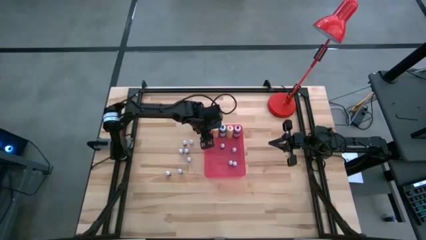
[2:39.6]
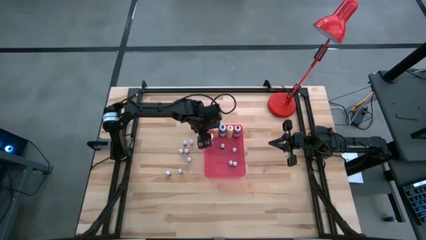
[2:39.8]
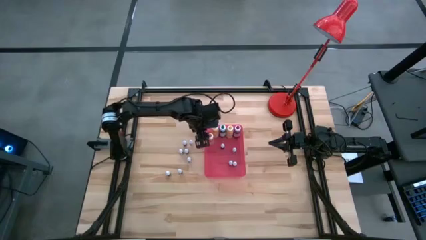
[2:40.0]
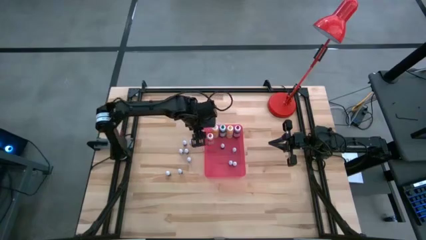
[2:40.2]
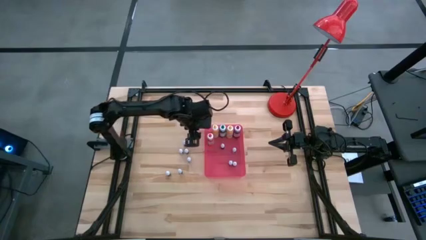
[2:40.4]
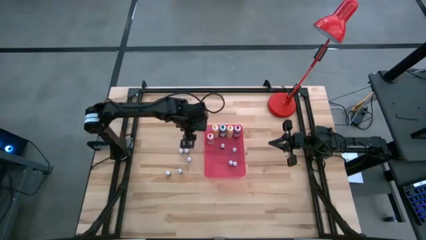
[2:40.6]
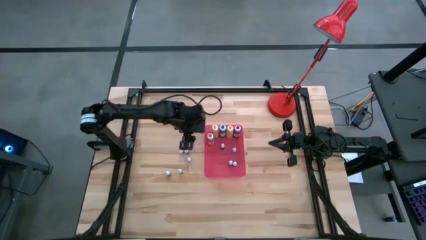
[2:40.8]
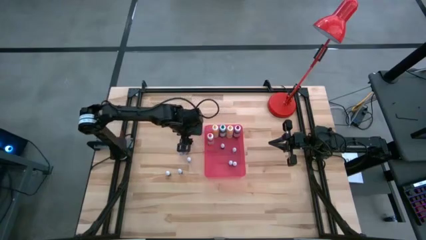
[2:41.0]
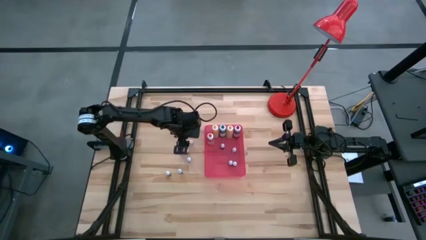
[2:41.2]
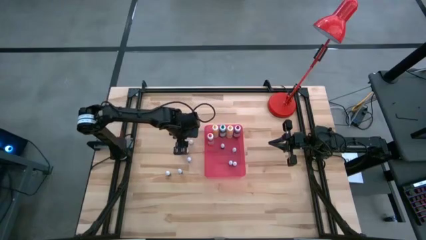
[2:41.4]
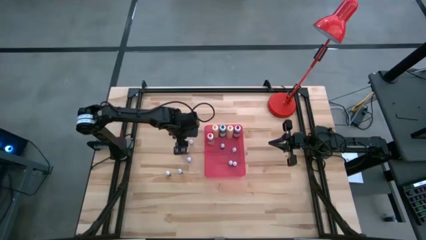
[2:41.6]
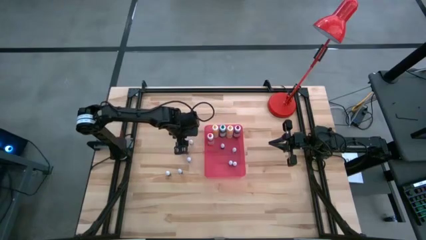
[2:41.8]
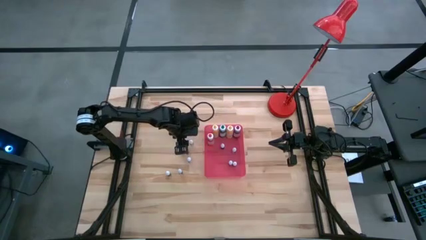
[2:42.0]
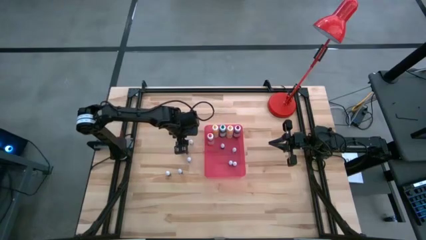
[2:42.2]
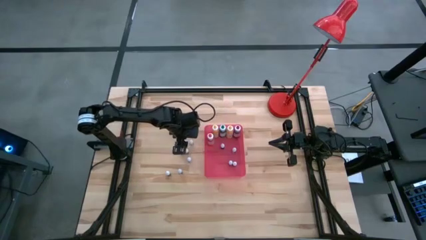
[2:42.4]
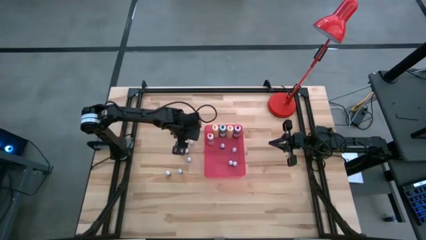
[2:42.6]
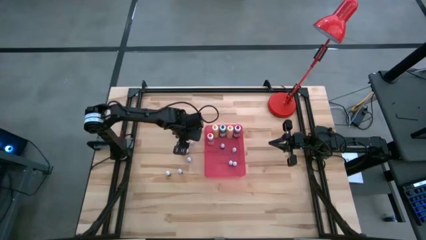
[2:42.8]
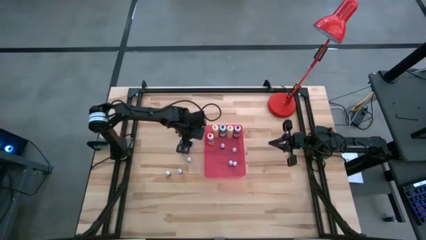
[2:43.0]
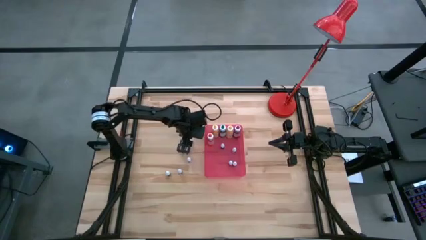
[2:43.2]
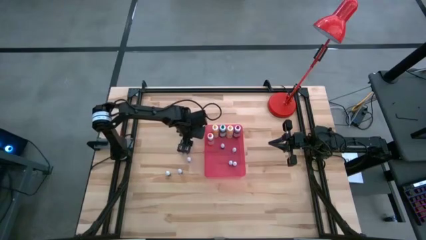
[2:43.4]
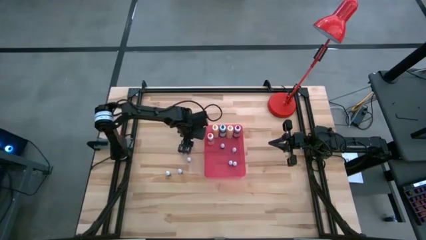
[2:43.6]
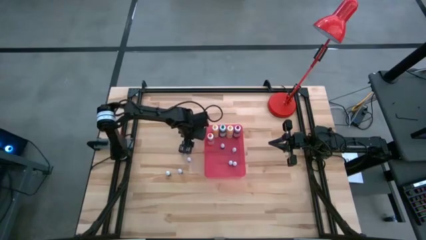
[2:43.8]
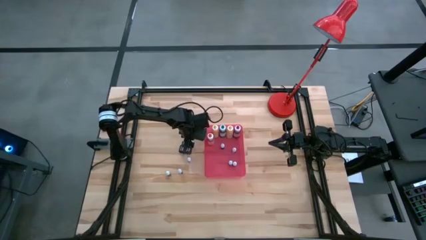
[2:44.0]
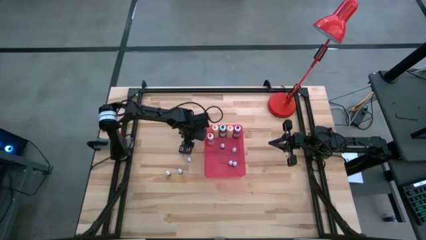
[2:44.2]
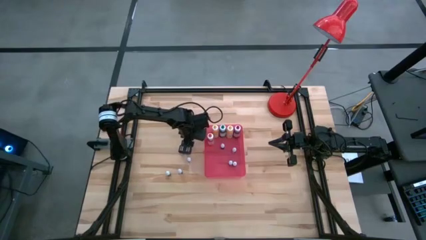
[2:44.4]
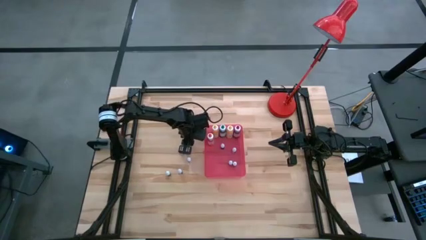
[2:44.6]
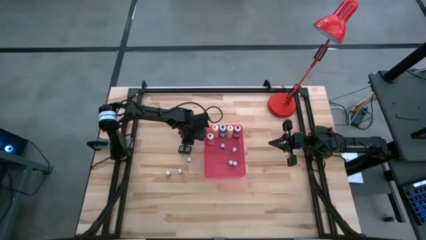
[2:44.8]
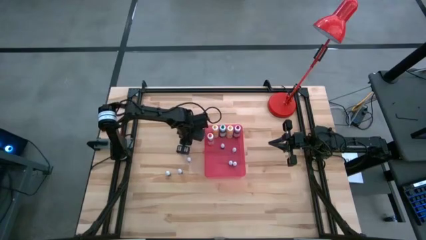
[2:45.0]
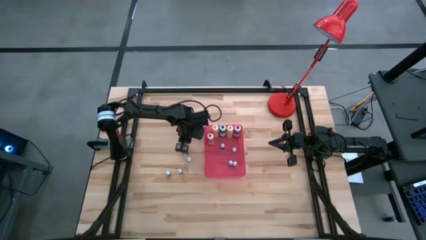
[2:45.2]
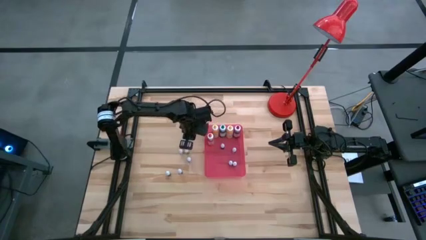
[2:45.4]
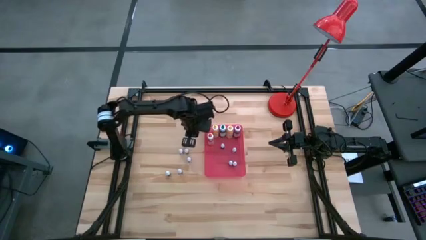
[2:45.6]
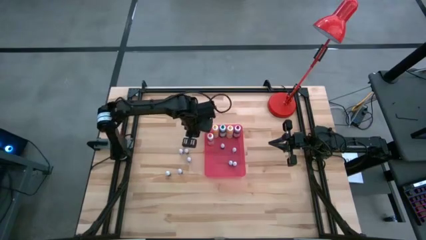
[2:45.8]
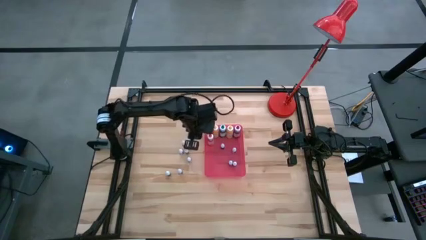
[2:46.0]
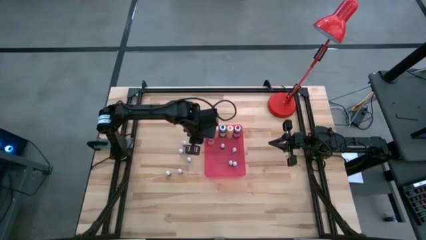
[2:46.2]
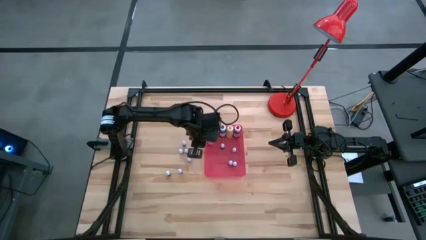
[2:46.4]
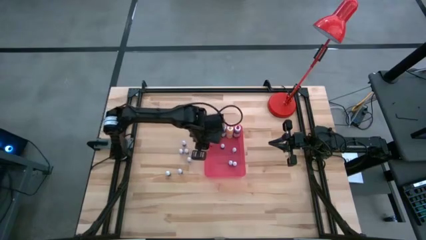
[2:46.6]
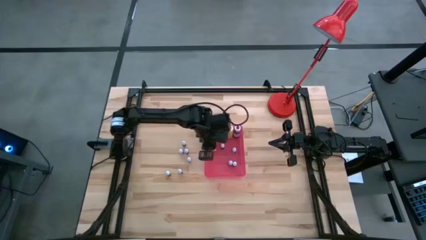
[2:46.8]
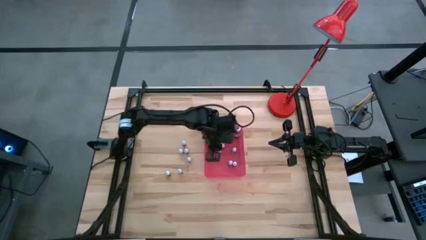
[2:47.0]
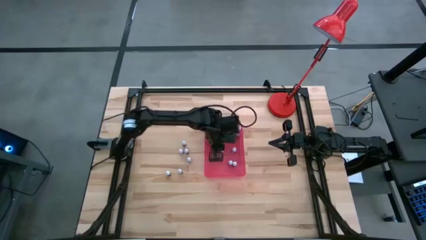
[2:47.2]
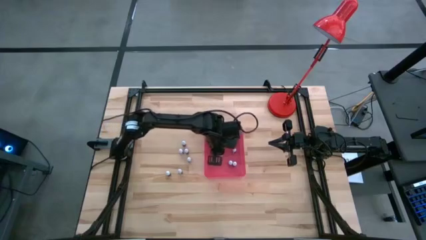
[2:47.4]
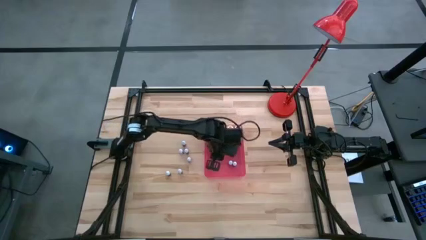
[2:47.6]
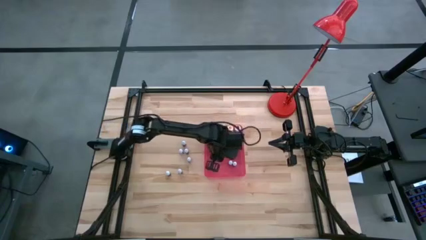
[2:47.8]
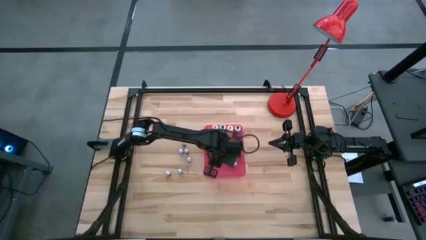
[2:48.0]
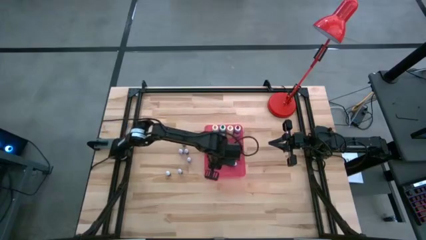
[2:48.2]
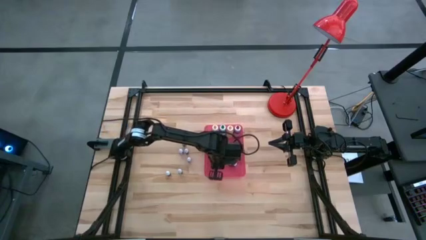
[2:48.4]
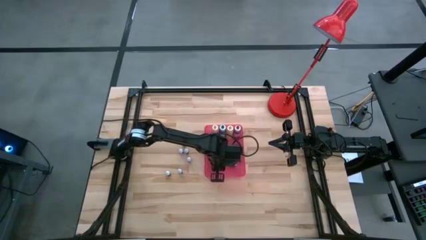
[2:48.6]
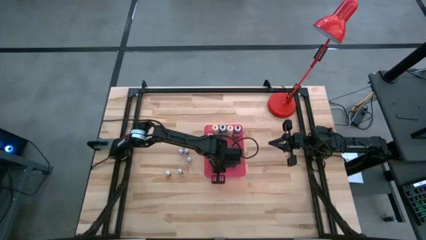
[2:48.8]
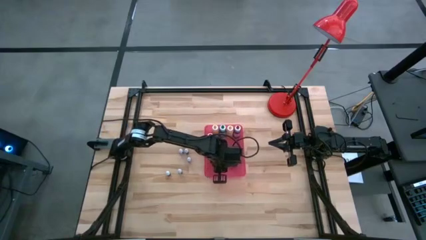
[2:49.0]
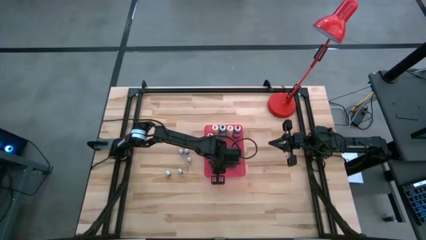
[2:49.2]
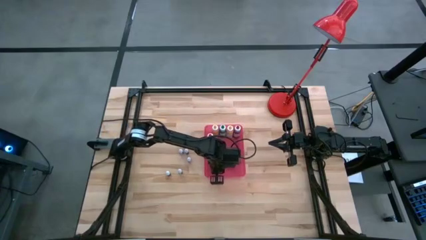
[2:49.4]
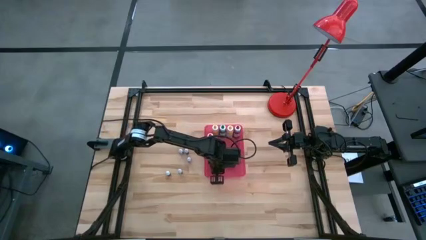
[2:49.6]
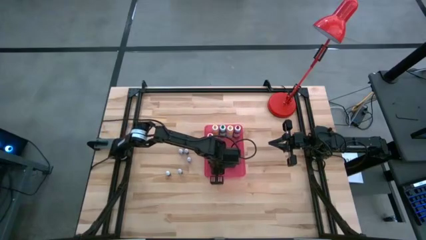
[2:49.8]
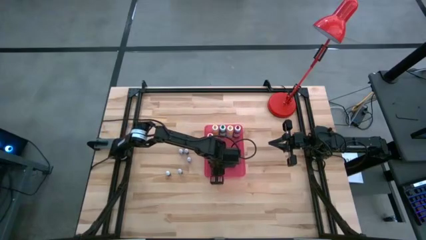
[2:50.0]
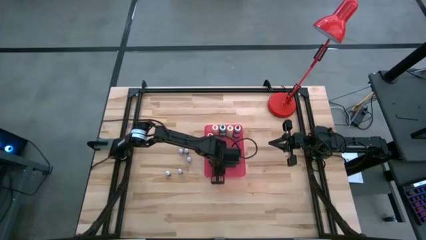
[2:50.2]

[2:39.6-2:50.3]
Task: Pick & Place food coloring
Put the small food coloring bottle into the red bin

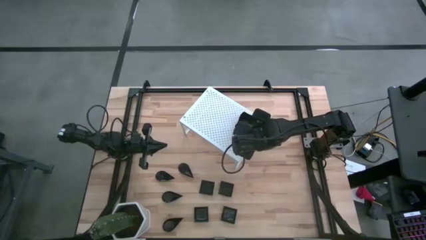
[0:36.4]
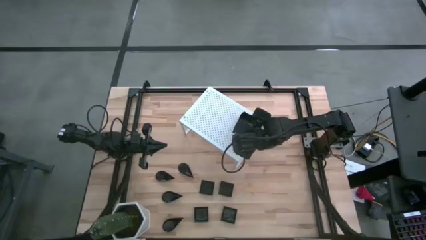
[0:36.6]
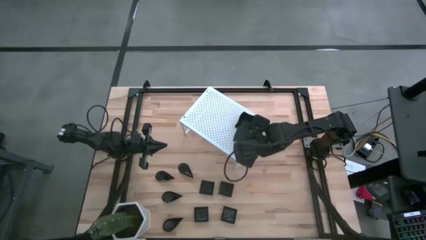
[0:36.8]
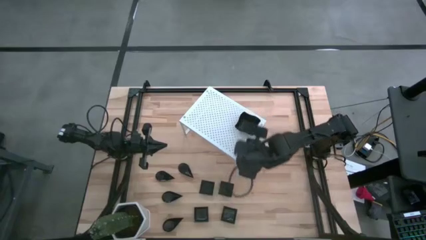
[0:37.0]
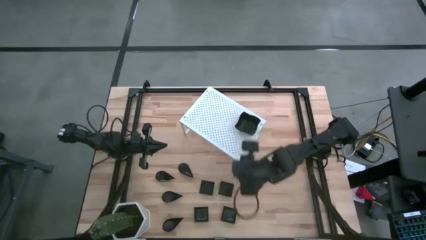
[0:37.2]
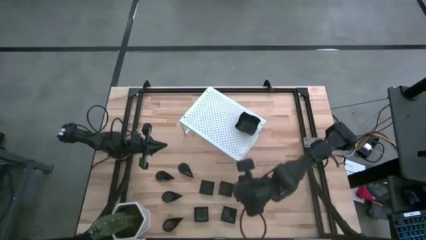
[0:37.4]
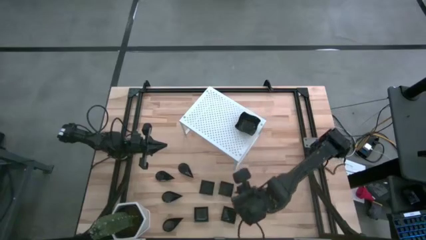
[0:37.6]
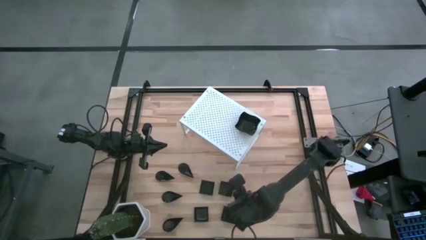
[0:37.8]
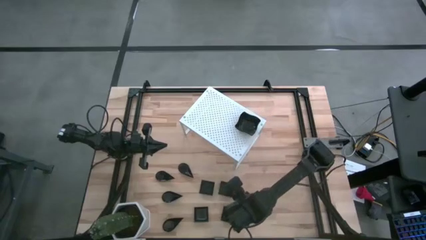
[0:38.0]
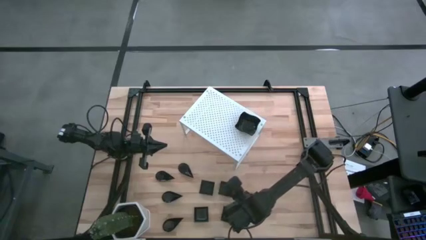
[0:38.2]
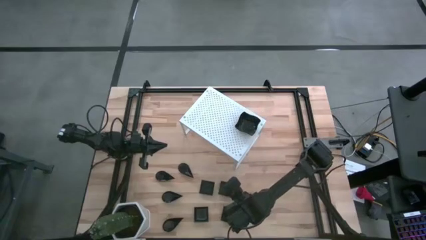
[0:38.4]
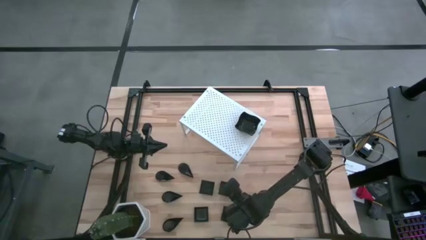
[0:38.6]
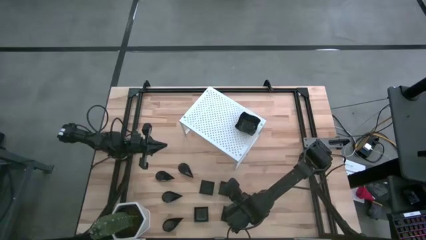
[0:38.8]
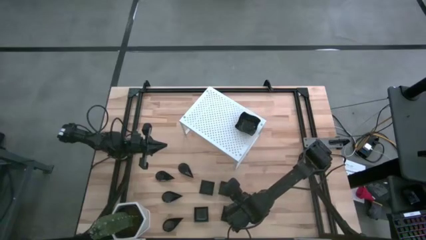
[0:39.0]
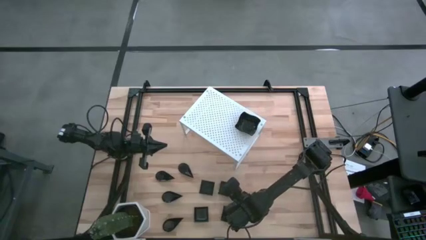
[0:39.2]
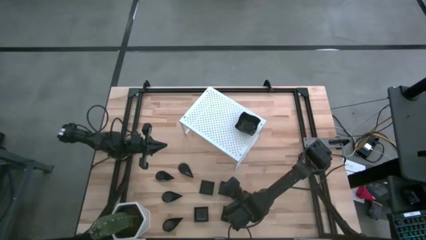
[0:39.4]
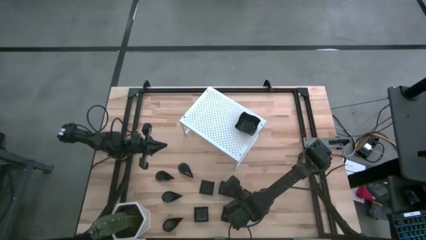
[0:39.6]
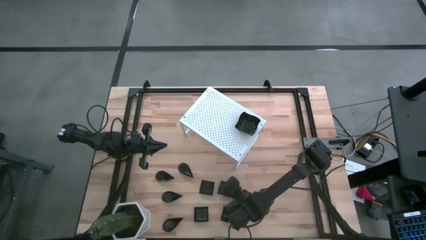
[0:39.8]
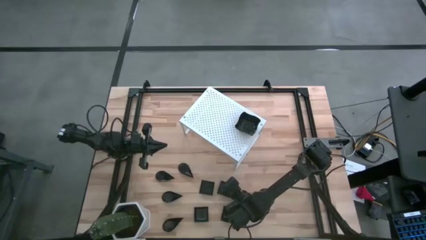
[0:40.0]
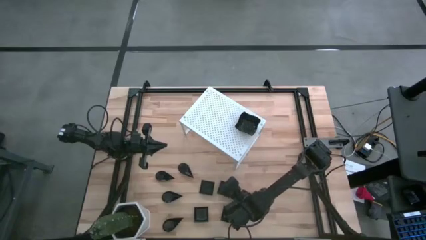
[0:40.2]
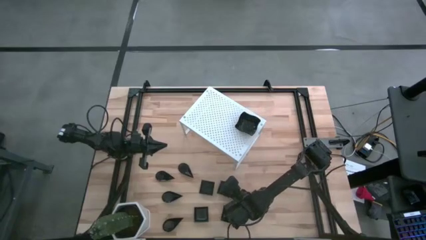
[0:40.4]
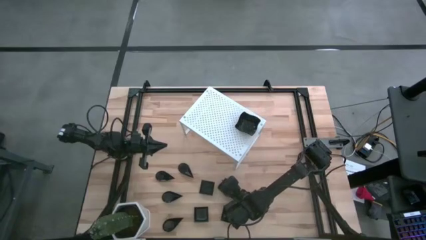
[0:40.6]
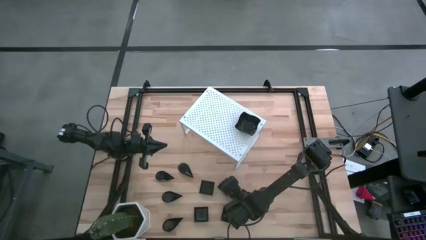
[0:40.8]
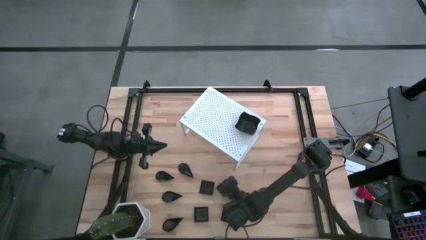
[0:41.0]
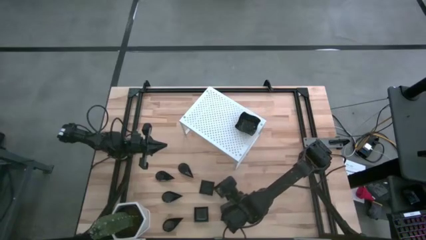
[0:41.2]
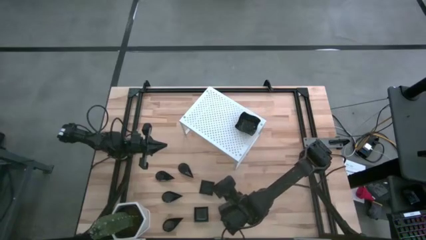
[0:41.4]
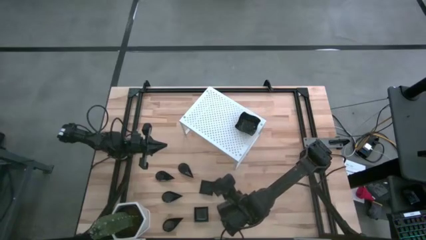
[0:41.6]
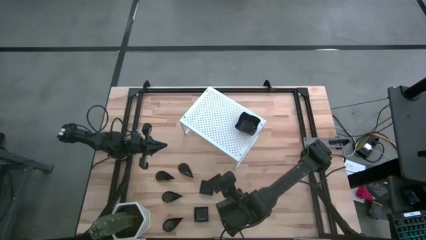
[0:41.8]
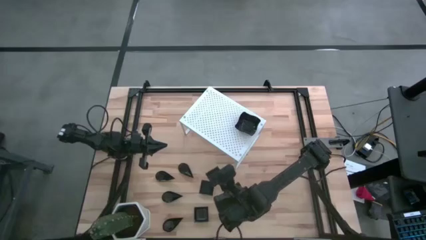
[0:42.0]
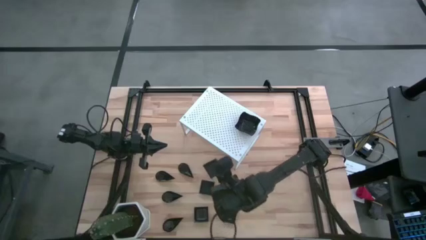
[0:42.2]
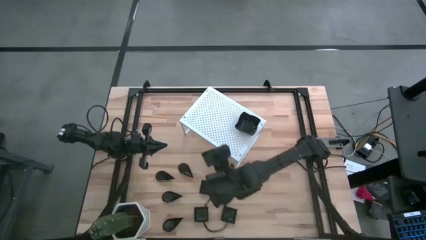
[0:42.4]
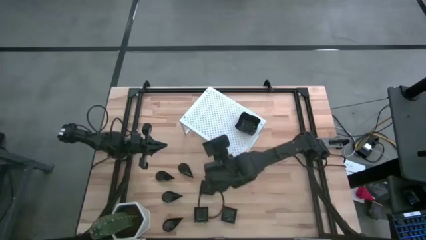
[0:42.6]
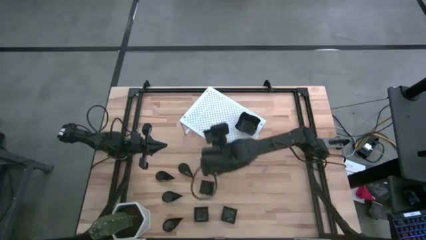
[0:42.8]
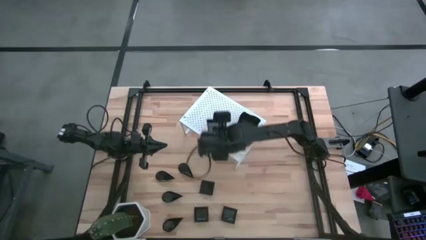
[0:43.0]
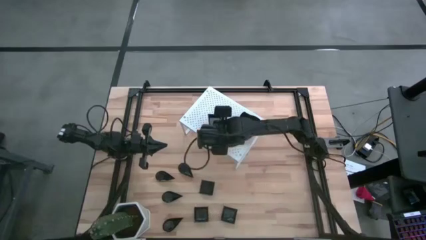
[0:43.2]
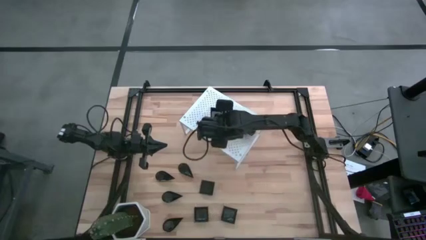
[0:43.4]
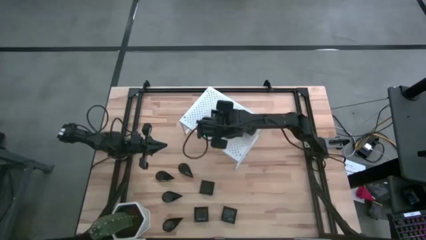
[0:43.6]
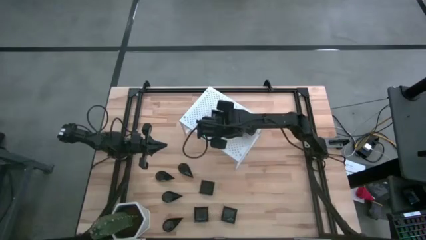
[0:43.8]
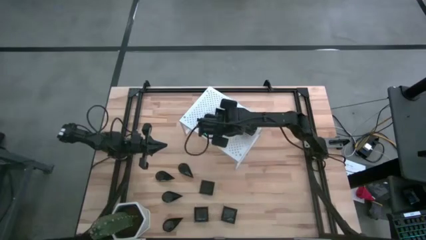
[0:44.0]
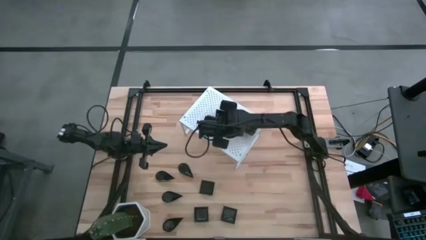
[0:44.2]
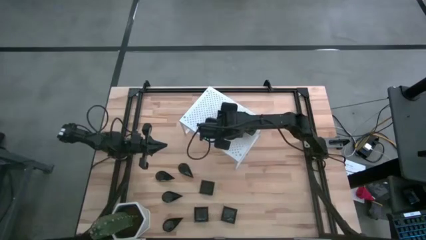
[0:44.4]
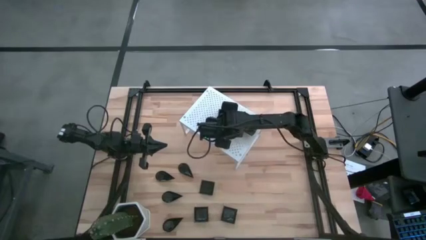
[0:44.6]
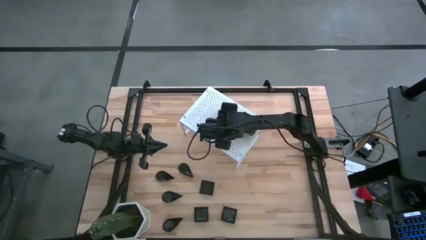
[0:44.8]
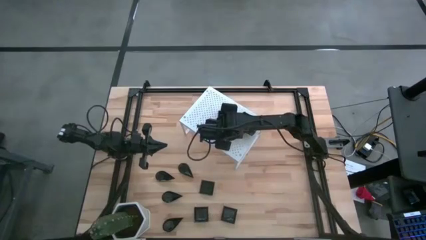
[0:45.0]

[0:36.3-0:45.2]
Task: Pick & Place Mini shaped plates
Put the square plate on the shelf
